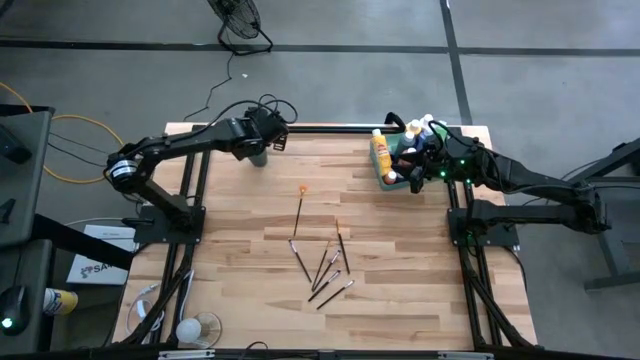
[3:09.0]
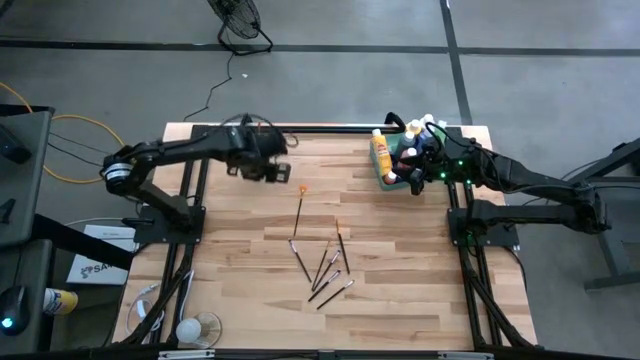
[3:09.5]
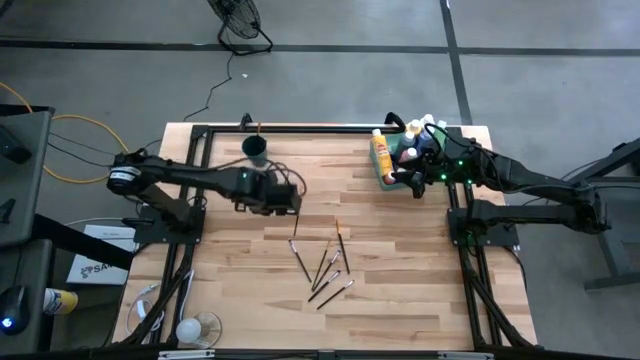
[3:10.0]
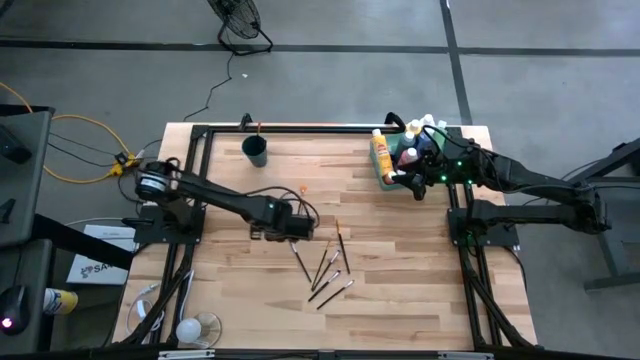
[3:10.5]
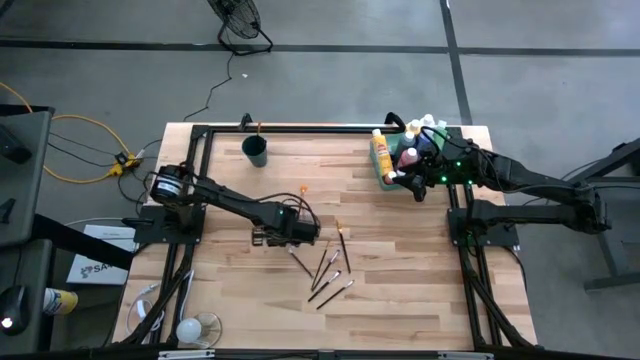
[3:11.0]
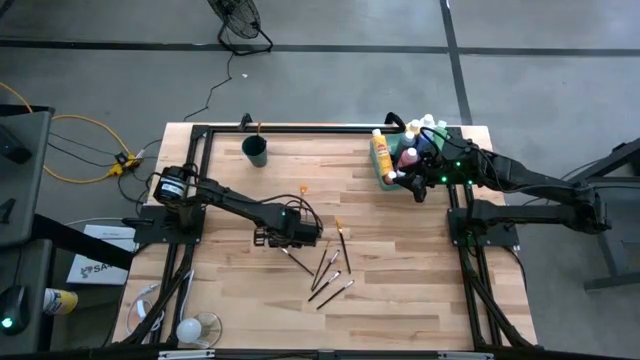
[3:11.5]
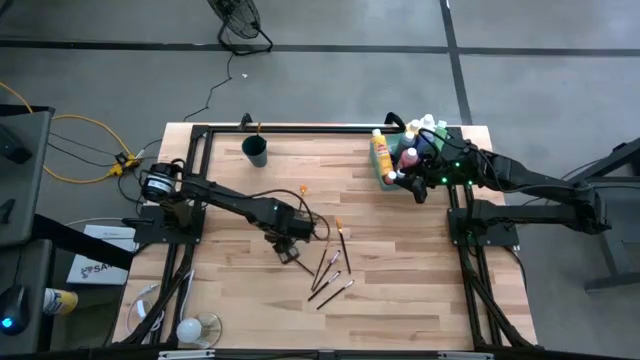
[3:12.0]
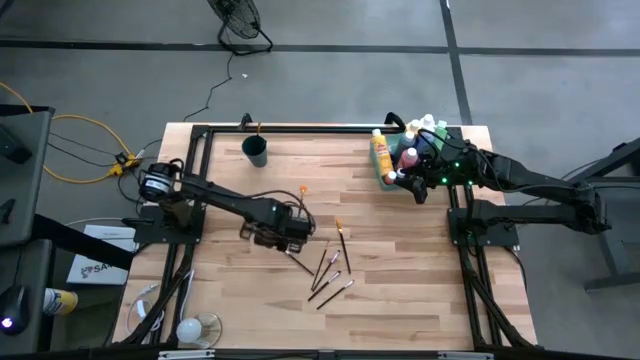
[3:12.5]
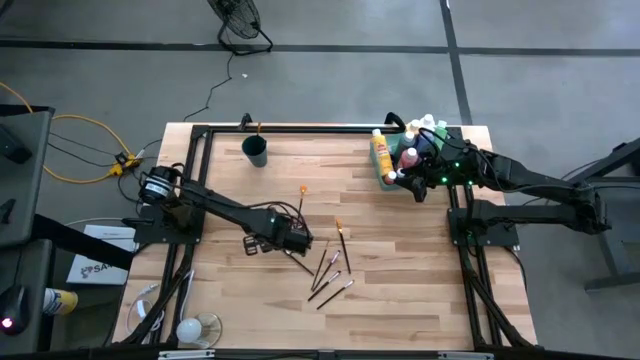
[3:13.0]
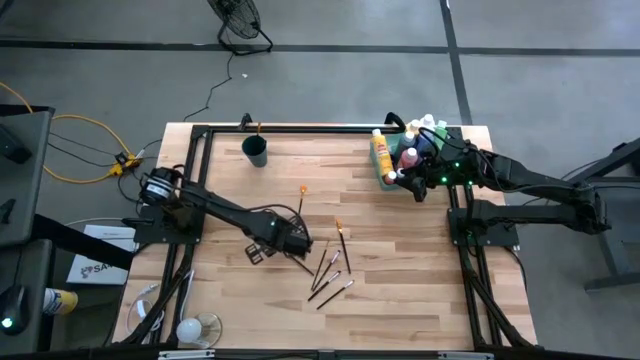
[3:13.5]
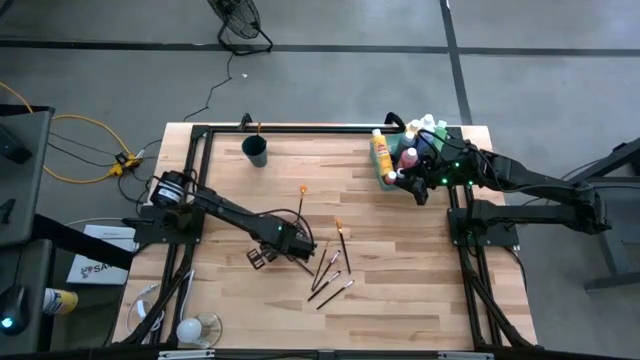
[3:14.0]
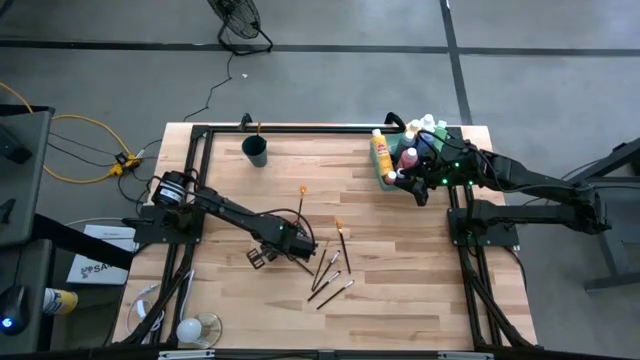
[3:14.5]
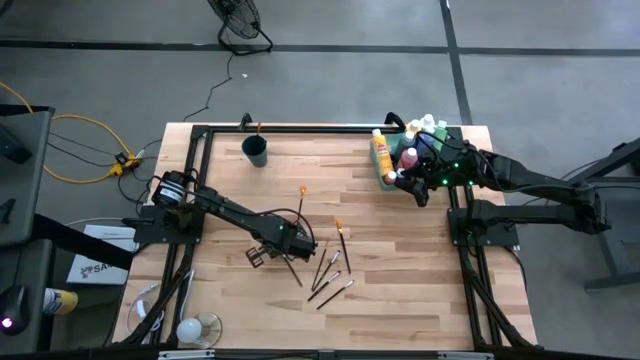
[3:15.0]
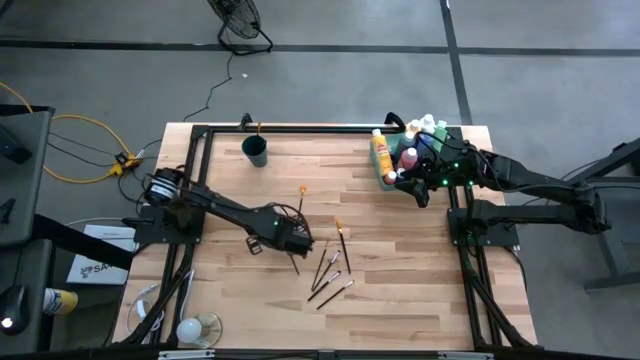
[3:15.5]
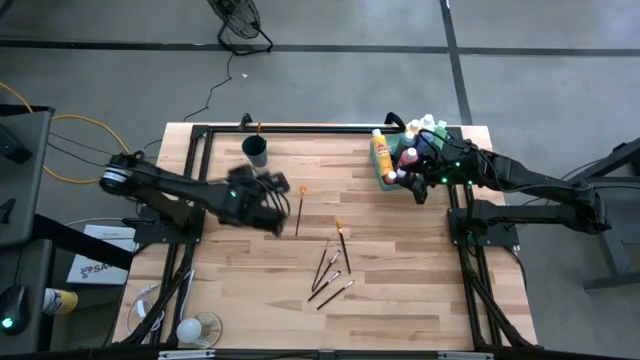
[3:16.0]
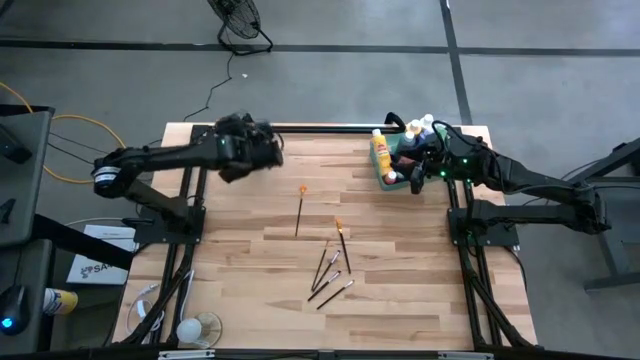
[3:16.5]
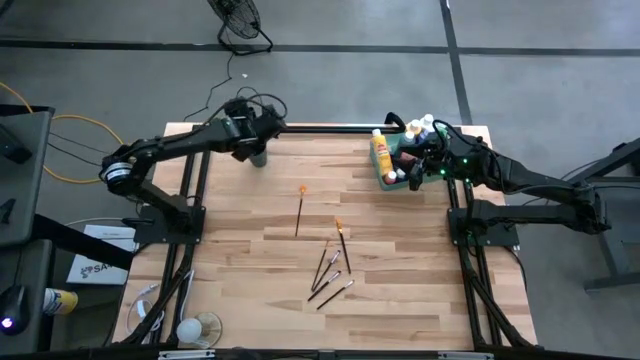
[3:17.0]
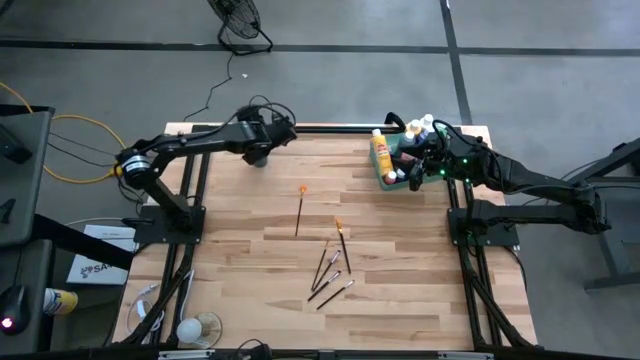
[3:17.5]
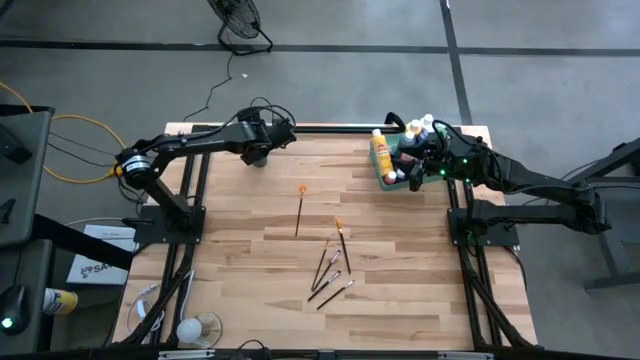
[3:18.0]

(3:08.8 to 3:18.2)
Task: Pick & Place Paint Supplies
Put the silver paintbrush into the blue cup

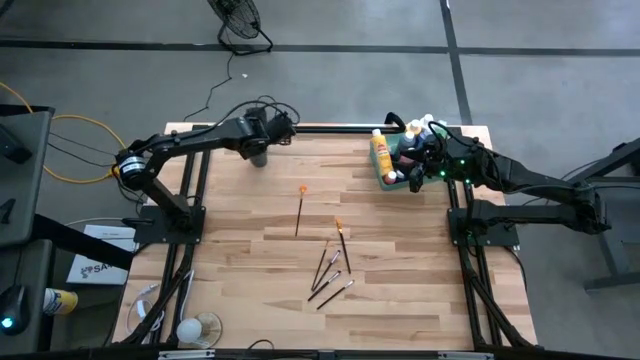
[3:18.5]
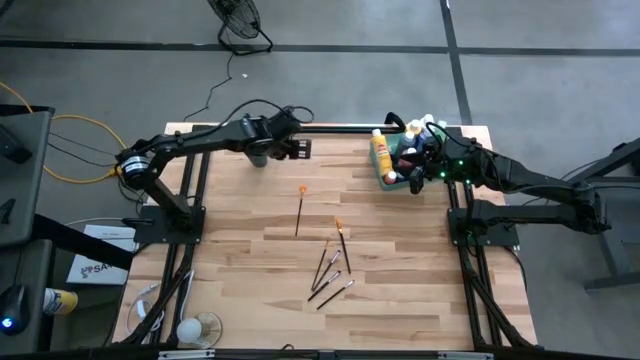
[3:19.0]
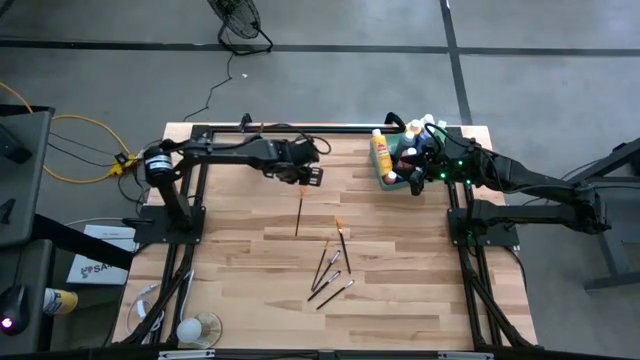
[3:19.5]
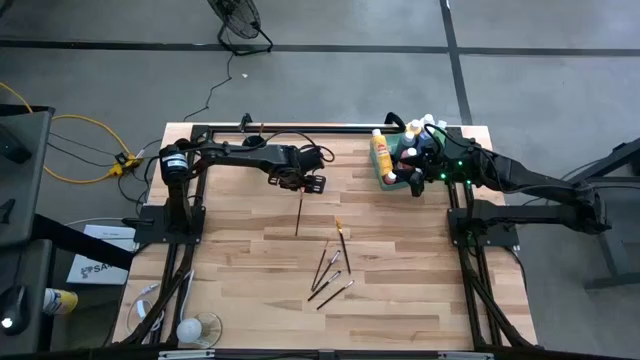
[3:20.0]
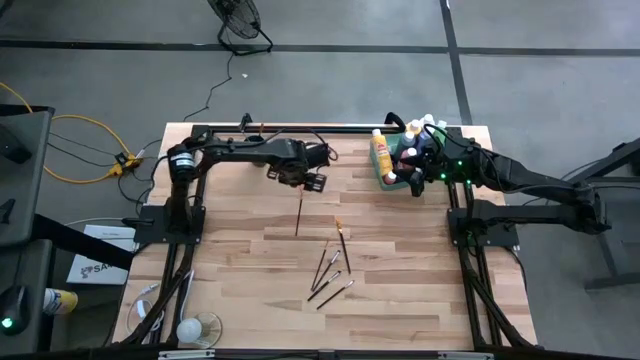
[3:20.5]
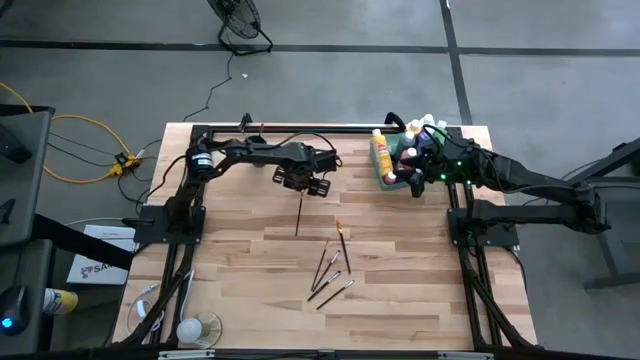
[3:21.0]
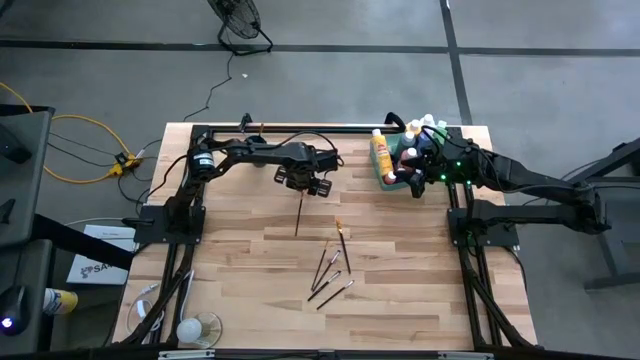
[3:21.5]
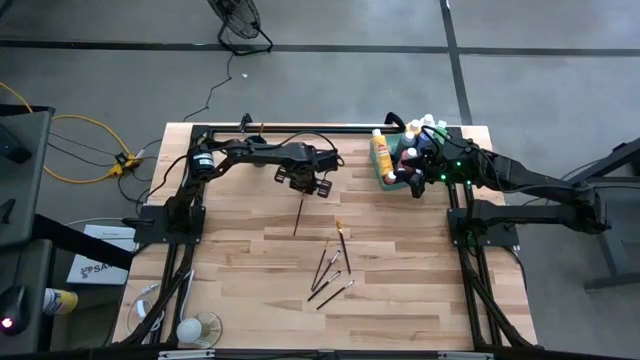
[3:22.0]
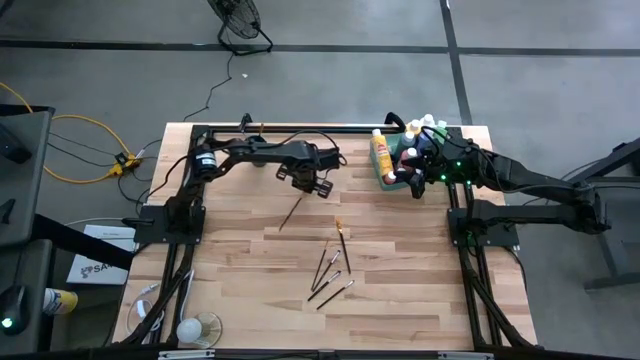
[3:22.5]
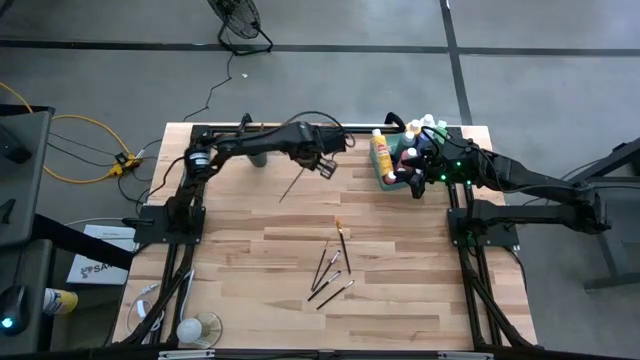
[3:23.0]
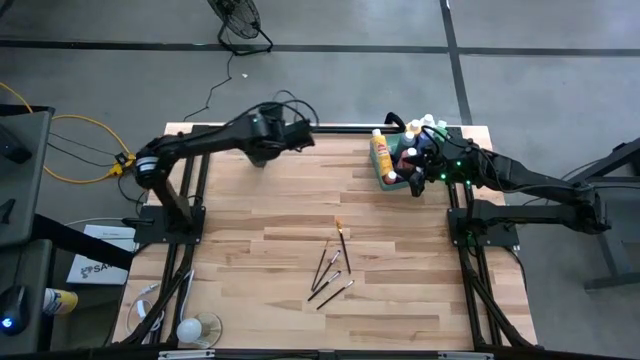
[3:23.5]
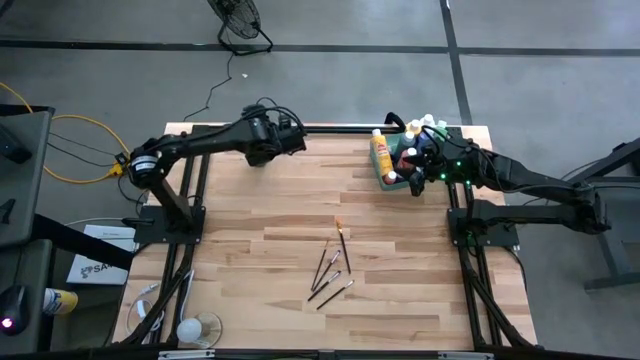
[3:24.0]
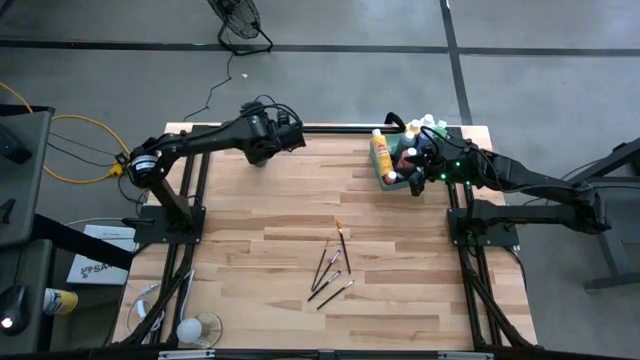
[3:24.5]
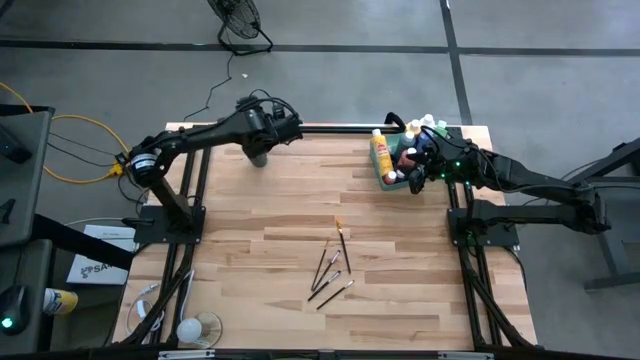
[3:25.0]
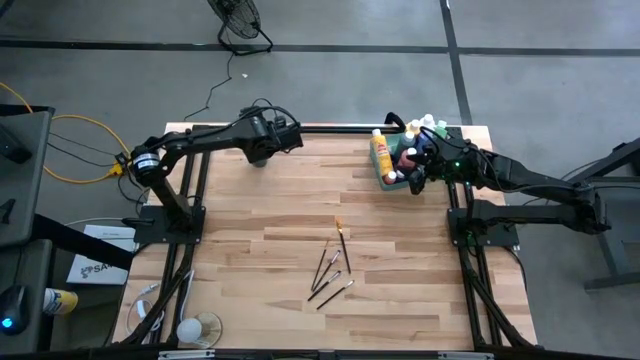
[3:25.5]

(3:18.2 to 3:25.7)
Put the gold paintbrush into the blue cup

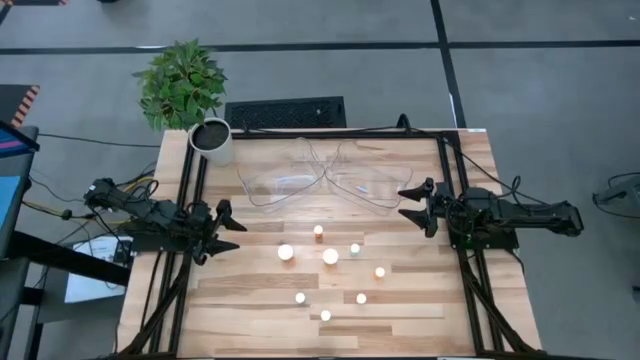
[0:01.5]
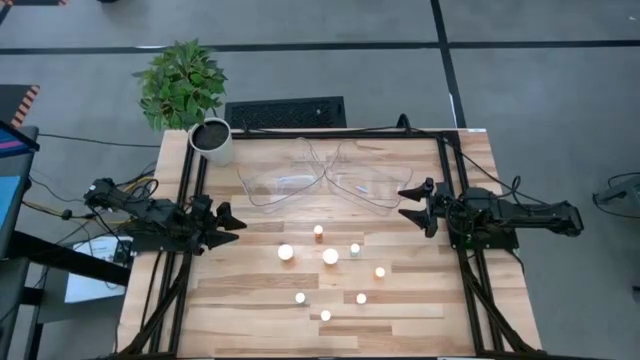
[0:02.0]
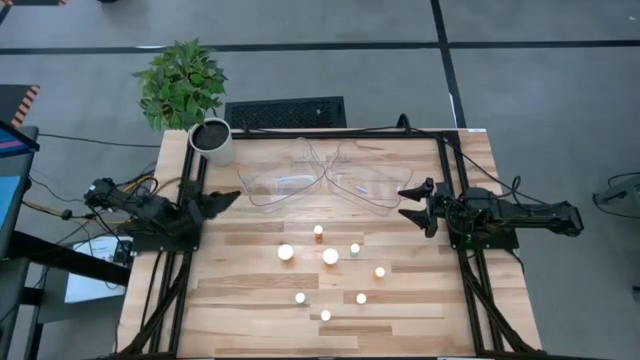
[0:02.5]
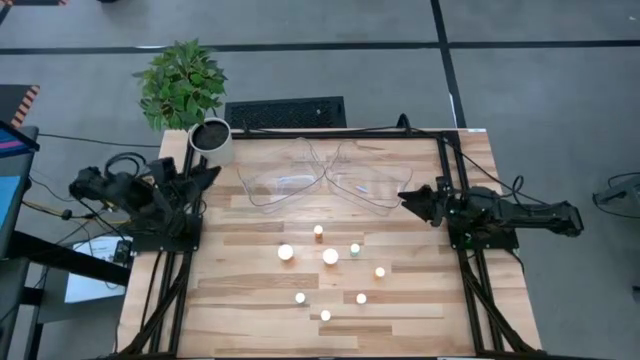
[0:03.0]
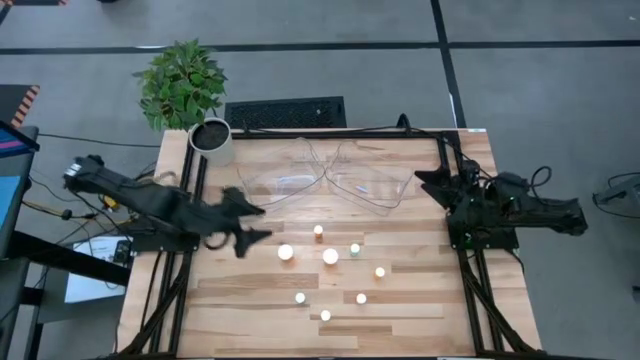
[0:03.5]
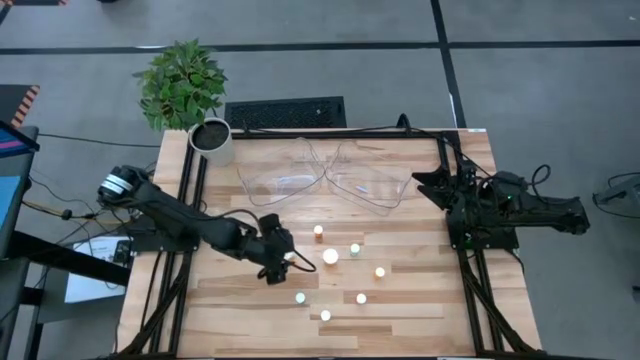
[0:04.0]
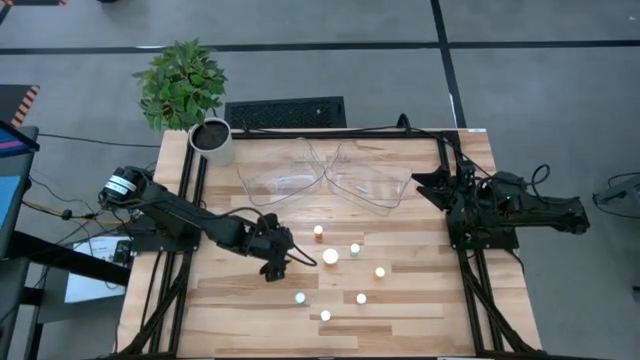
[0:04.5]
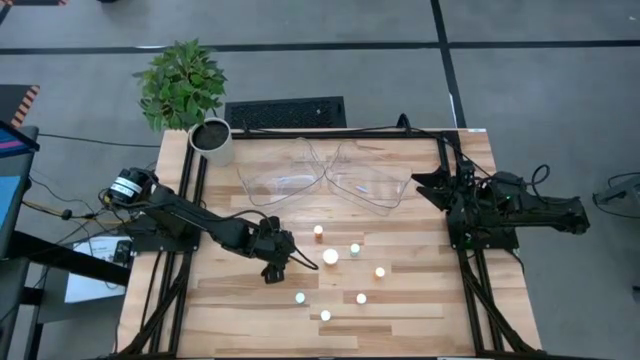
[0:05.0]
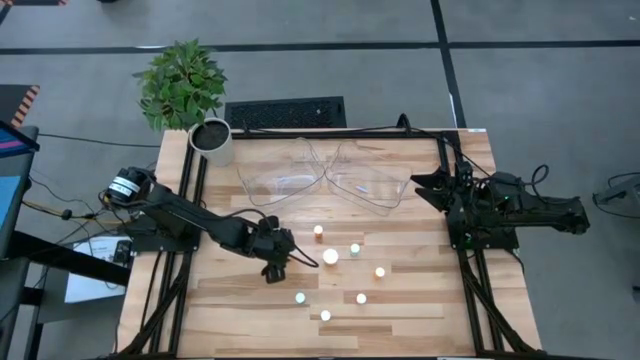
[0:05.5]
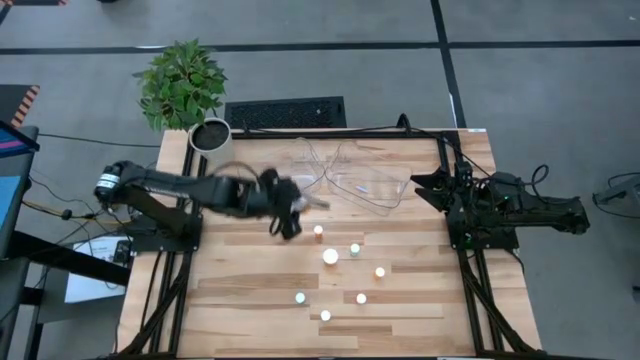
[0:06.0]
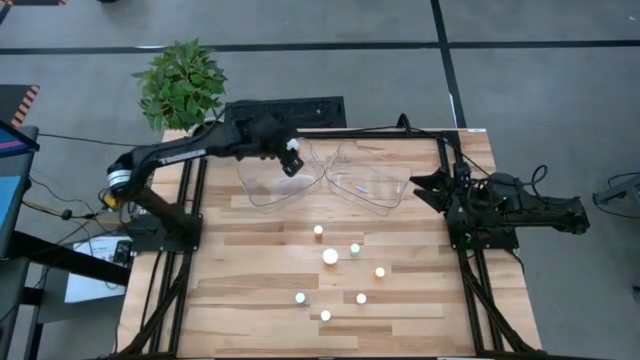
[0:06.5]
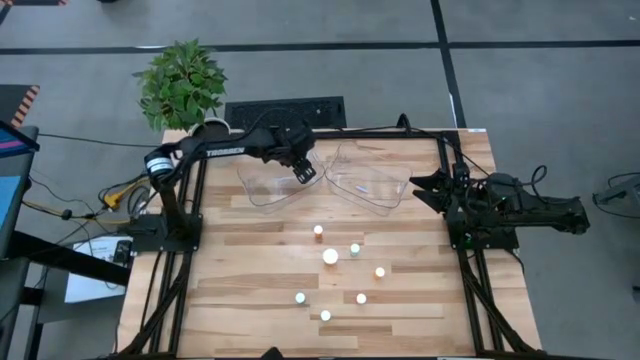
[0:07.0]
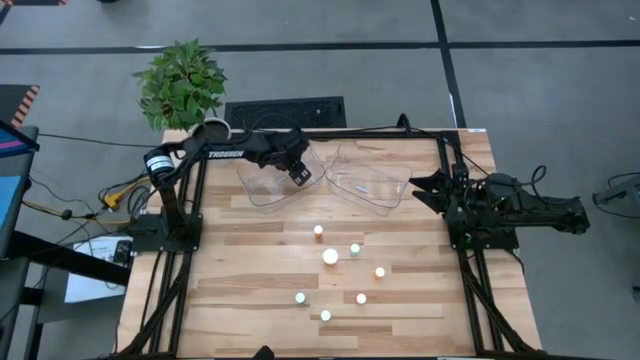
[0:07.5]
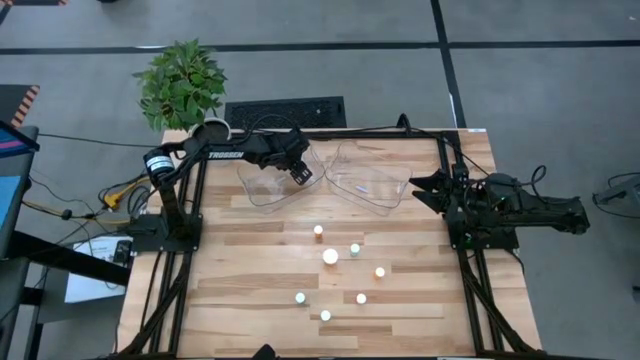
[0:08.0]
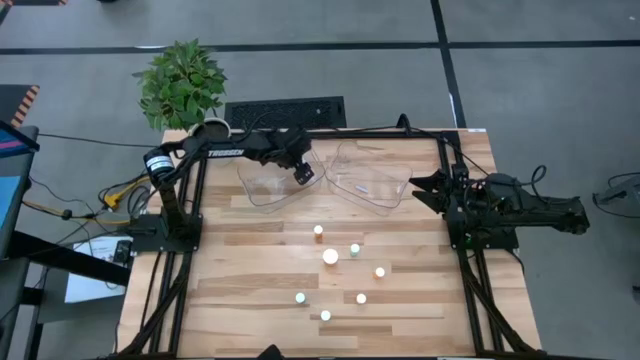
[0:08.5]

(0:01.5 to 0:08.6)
Task: Pick and place medicine bottles into bin by pill shape (circle, oval)
Put the left orange capsule bottle into the left transparent bin
